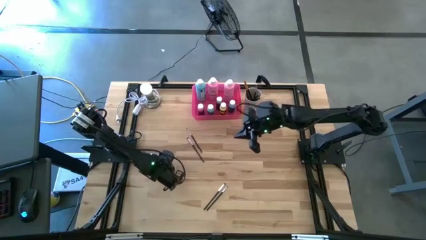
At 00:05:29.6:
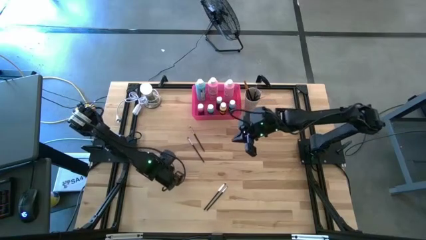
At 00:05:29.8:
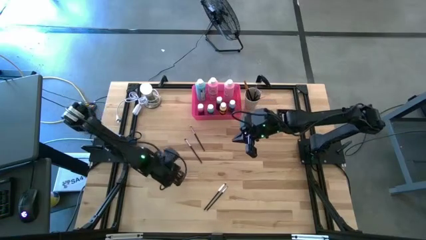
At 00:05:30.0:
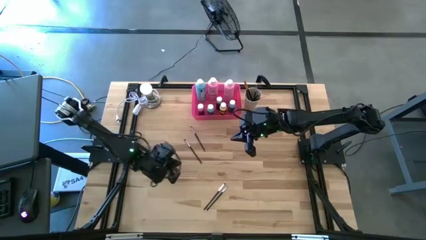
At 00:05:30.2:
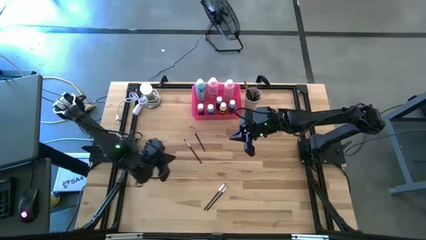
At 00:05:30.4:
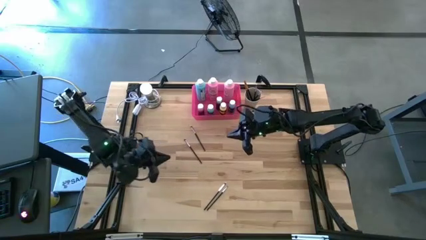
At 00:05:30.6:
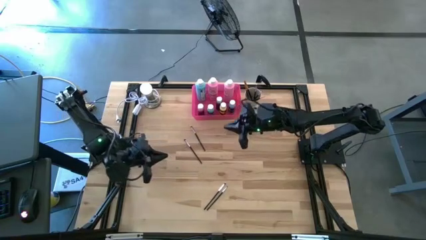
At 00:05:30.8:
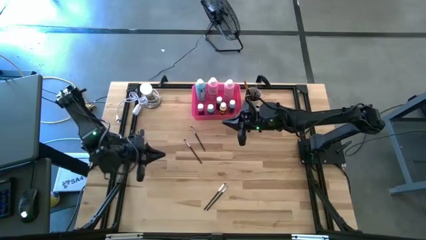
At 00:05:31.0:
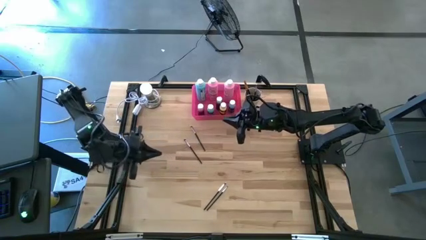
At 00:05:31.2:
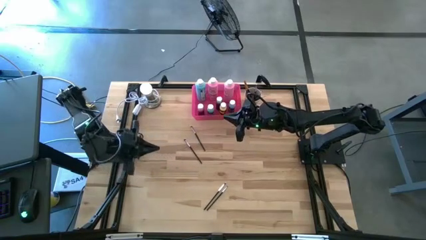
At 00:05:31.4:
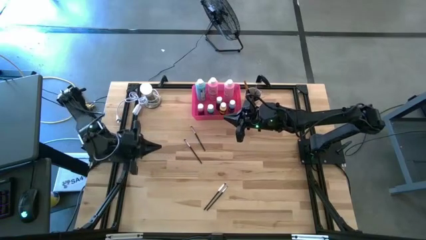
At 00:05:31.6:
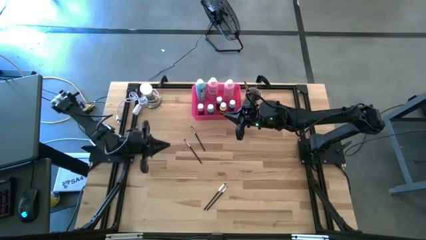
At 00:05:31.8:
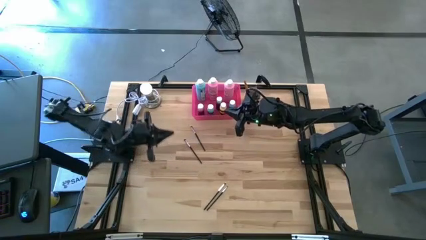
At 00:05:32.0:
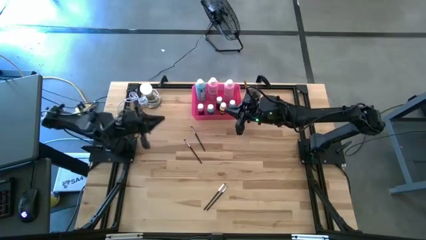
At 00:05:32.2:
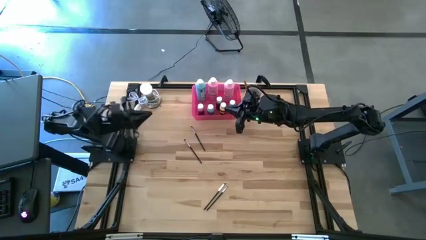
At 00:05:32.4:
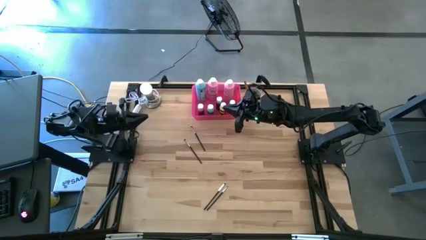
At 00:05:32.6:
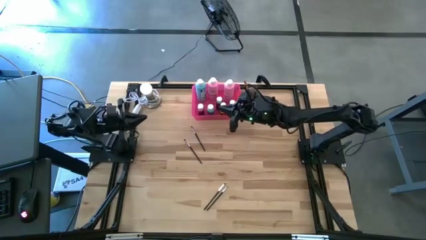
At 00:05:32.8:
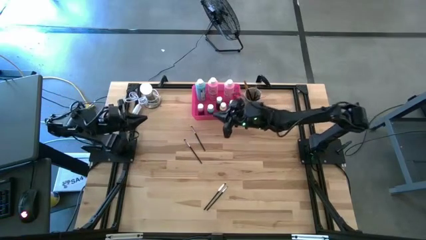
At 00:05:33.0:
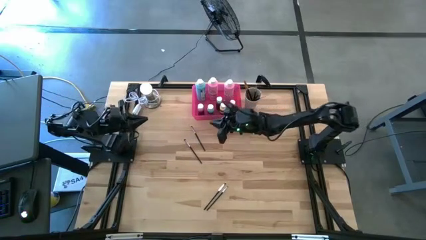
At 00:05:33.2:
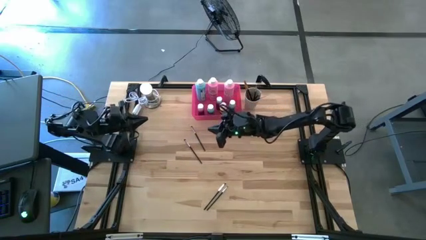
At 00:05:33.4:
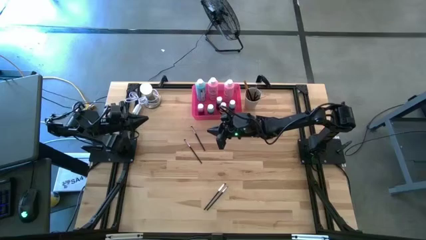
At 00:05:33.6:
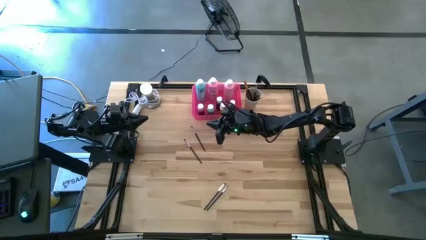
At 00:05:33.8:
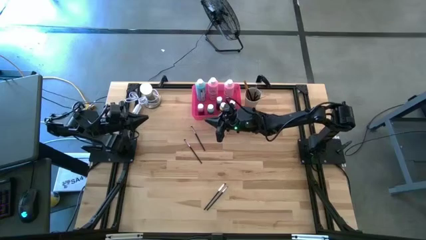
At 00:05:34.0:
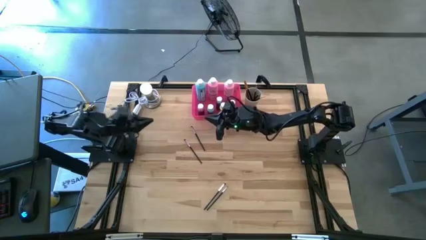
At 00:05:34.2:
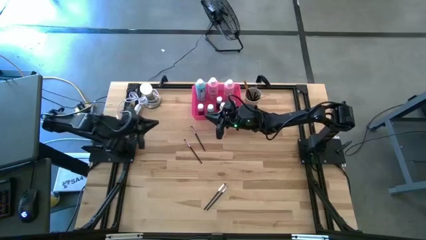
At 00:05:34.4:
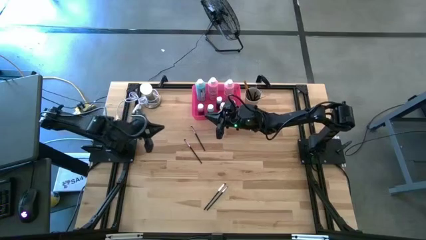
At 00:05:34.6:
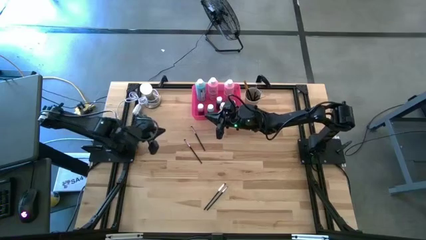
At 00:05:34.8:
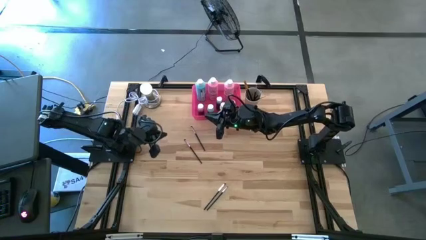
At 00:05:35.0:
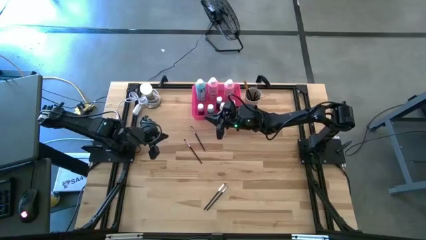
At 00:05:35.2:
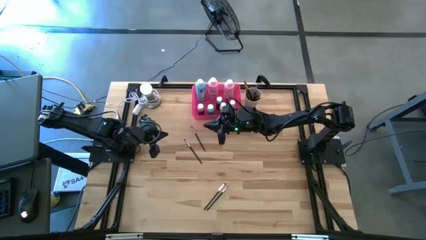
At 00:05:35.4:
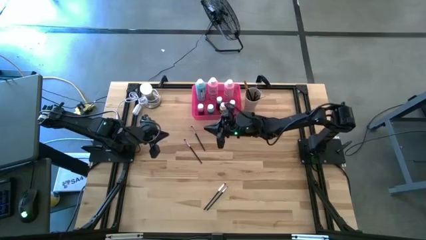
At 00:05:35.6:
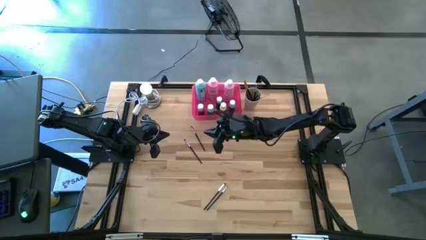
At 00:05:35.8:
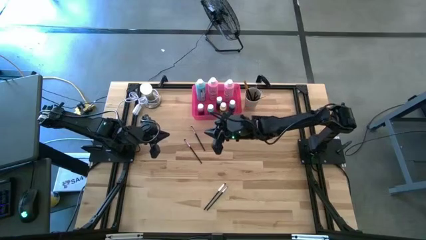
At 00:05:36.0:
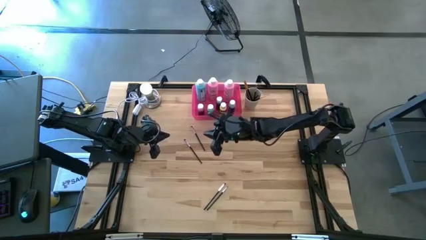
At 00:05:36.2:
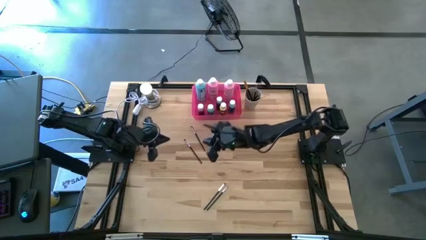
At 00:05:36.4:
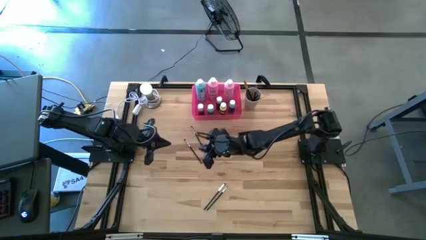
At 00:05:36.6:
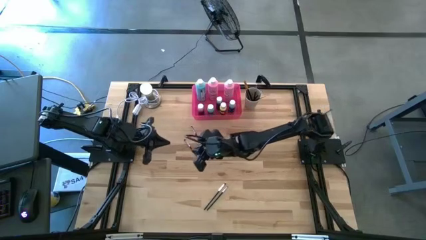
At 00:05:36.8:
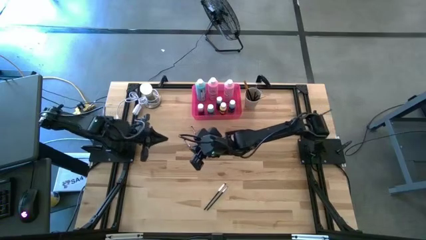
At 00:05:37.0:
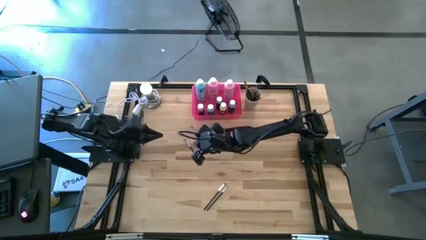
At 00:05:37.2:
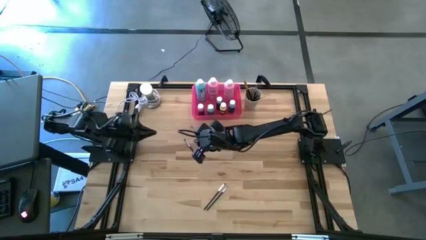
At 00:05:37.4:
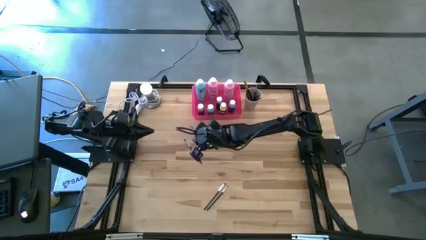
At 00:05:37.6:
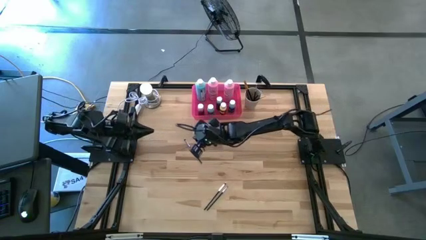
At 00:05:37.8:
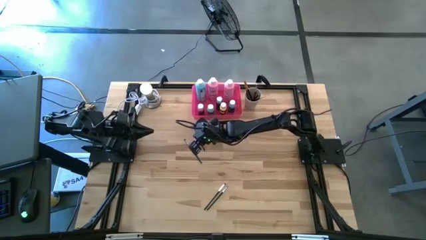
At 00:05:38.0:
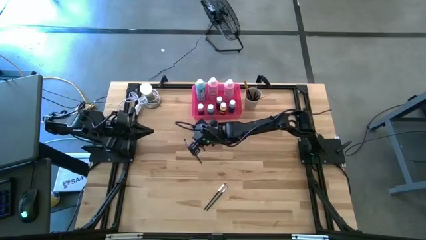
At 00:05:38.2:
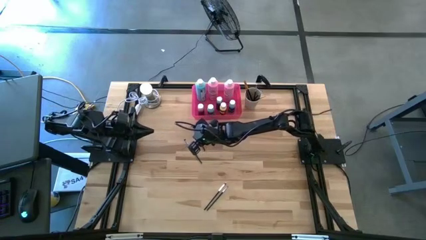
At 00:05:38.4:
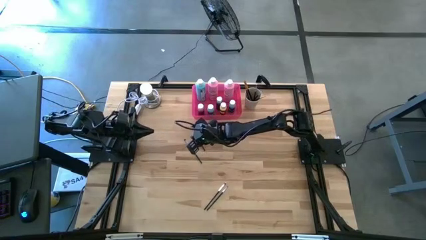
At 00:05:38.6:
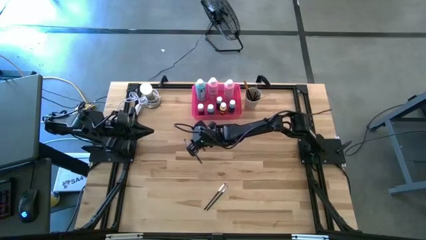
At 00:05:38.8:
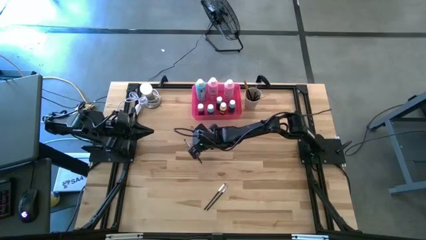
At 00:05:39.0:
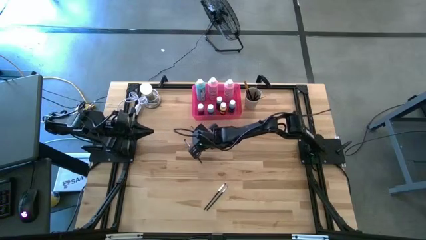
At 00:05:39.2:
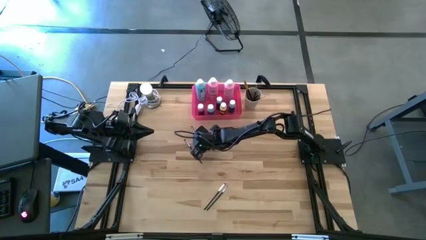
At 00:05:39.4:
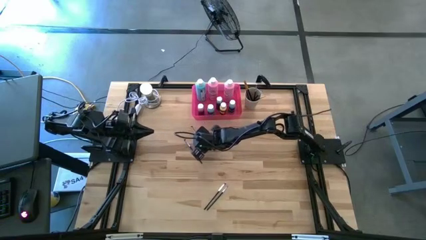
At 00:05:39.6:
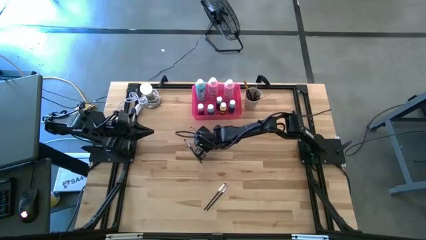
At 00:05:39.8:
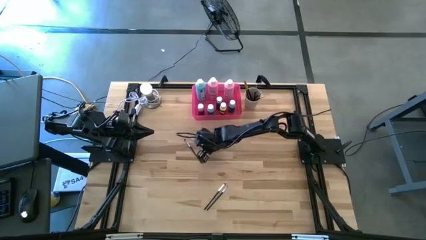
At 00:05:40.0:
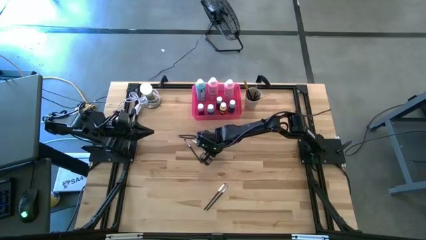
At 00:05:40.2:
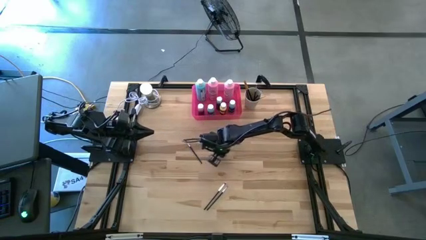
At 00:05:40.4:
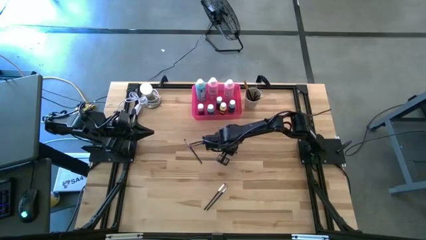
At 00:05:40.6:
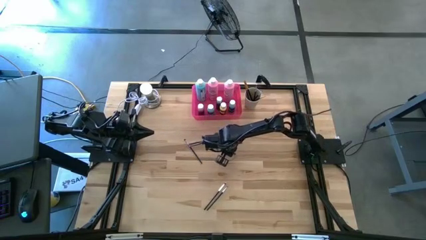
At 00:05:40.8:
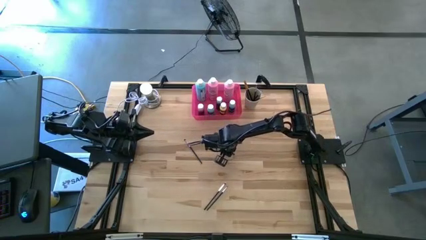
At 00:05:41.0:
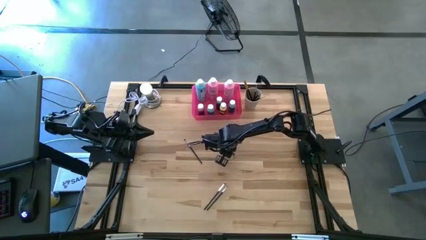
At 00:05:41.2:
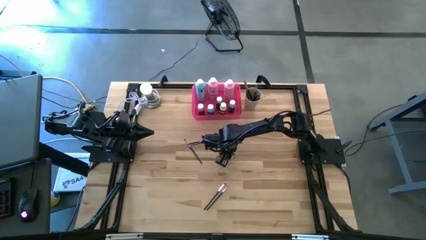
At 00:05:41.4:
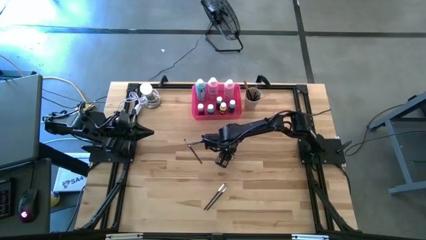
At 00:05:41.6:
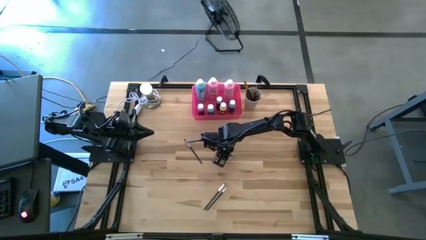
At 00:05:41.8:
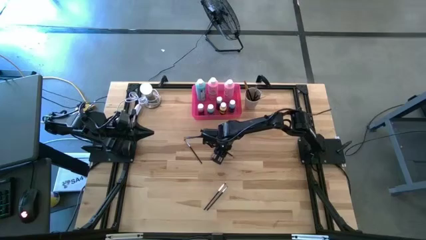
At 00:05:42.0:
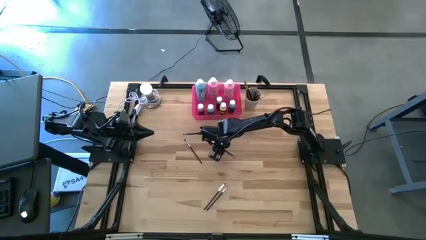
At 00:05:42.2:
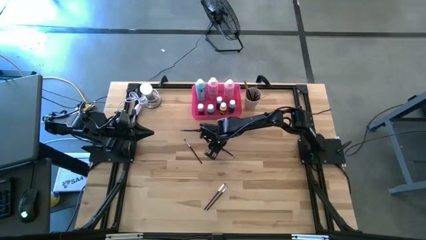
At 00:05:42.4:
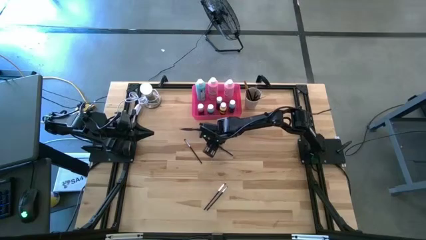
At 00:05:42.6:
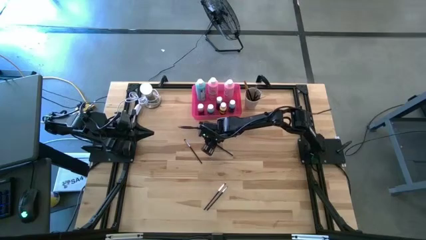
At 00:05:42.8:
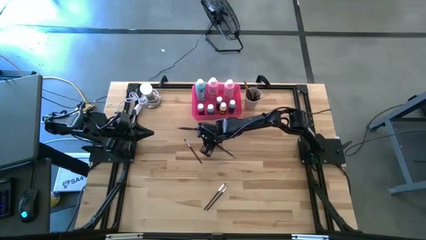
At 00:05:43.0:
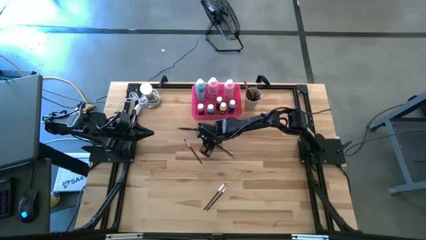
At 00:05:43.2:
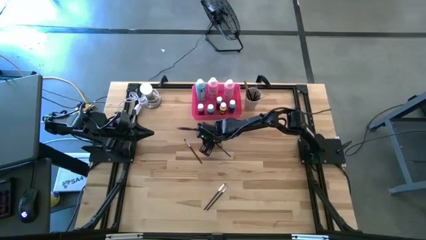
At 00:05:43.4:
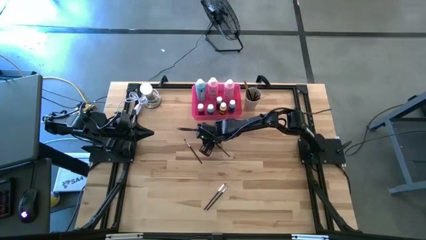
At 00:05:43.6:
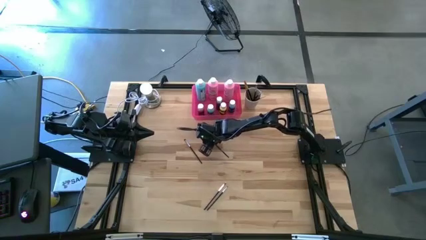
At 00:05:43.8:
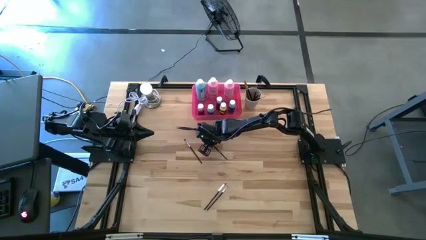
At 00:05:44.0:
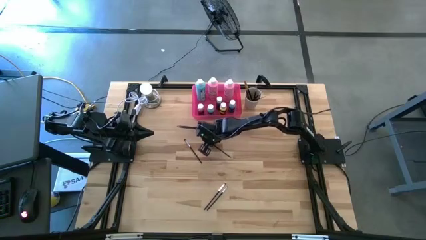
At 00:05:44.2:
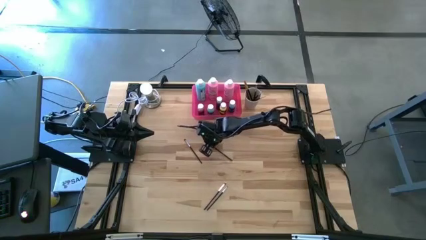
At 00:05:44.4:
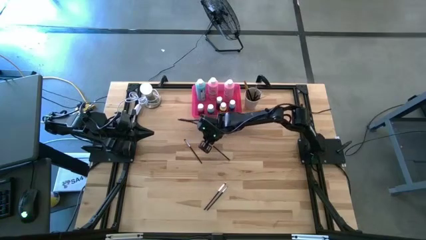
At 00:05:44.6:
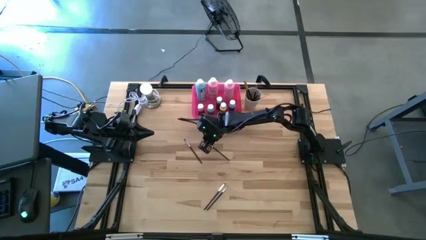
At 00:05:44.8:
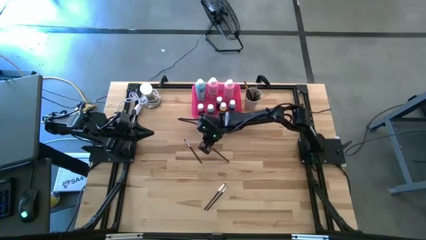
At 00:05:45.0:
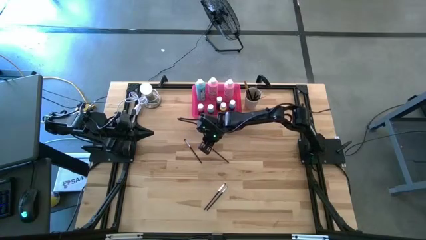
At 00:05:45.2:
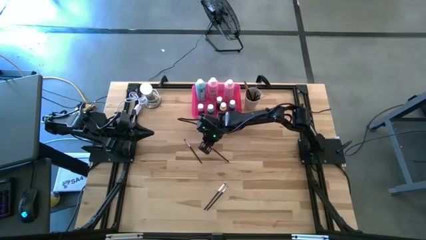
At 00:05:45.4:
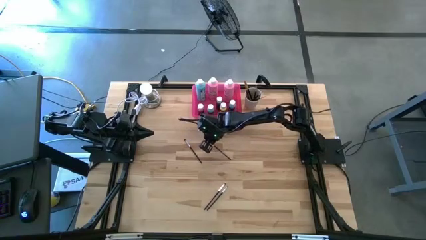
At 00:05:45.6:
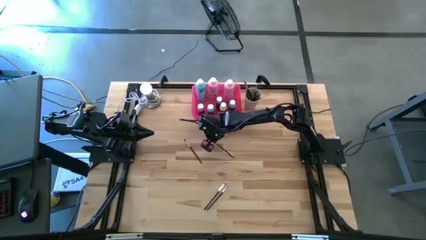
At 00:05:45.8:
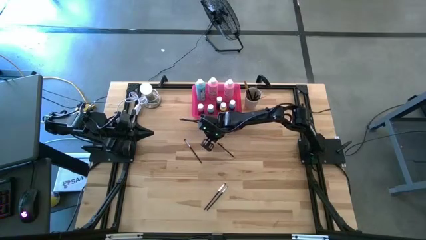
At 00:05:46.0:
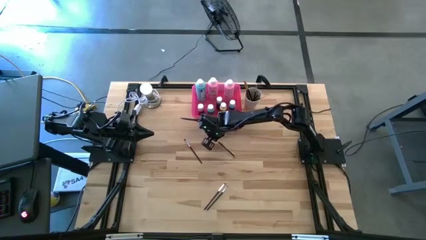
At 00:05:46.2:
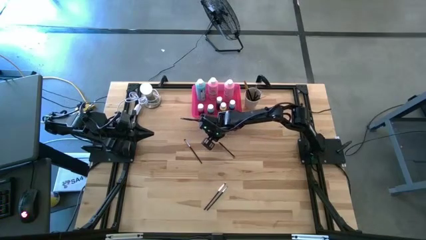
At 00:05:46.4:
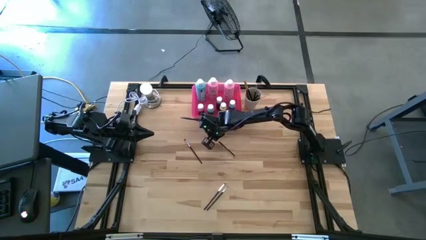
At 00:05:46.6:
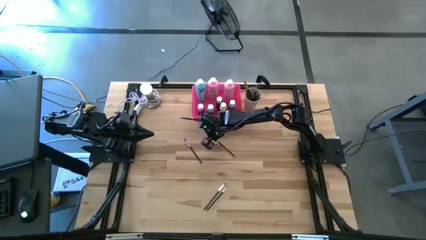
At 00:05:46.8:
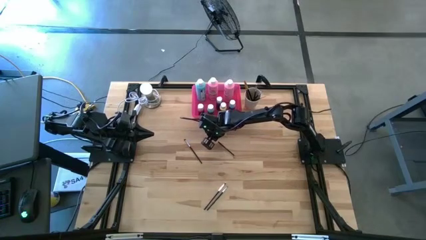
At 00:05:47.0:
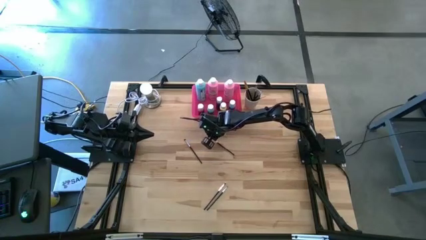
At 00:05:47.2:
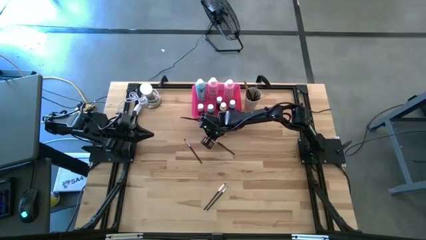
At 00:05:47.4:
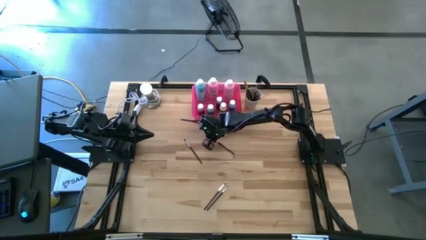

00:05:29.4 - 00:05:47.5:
Task: Pick & Place Paint Supplies
Put the silver paintbrush into the white cup
